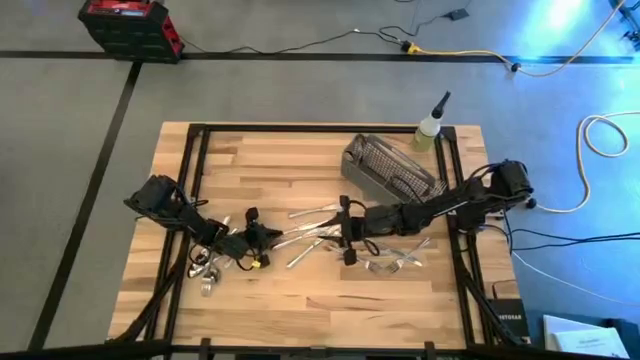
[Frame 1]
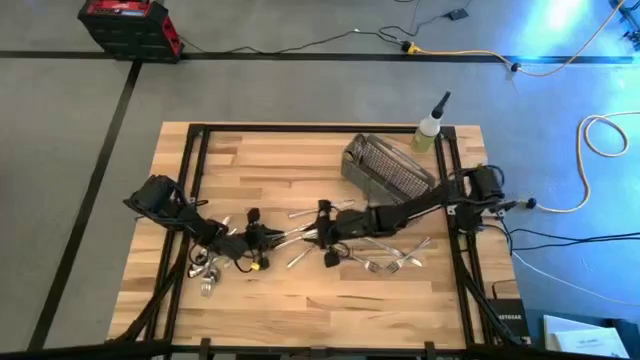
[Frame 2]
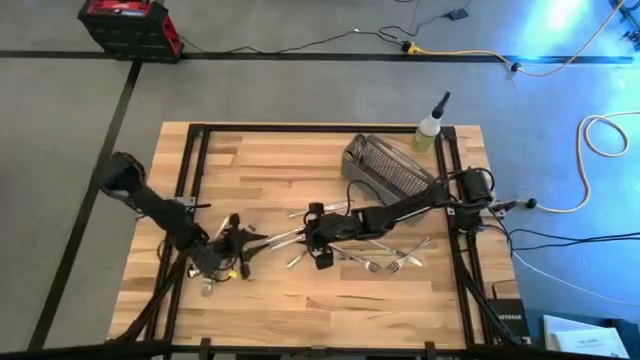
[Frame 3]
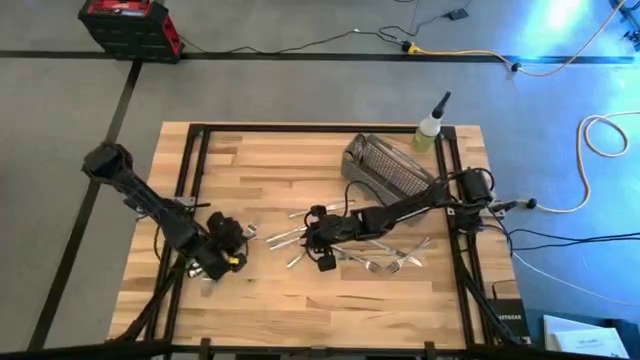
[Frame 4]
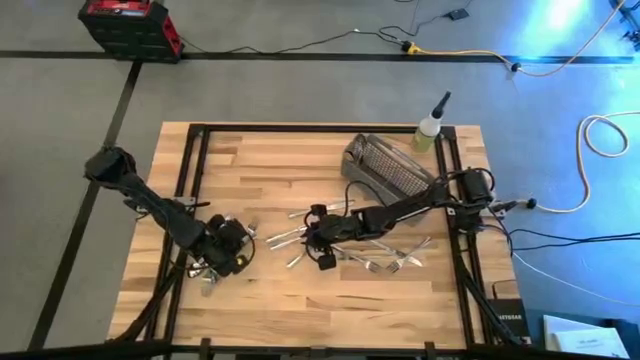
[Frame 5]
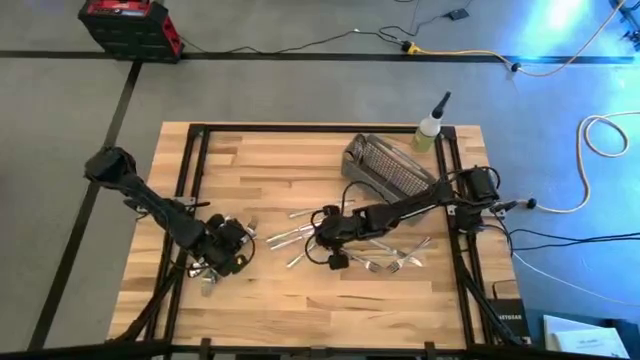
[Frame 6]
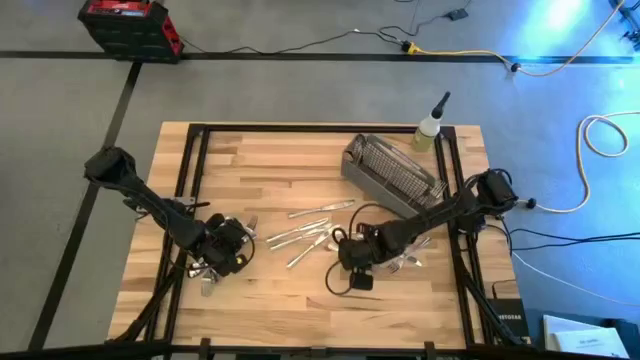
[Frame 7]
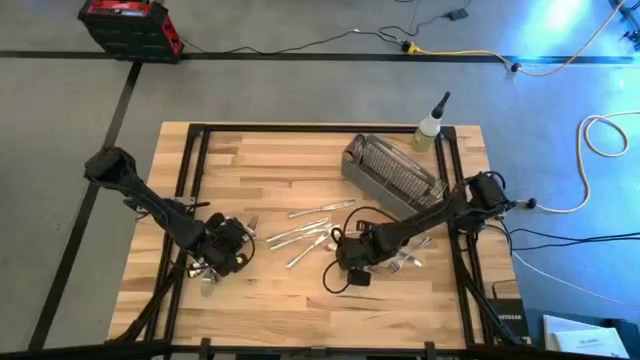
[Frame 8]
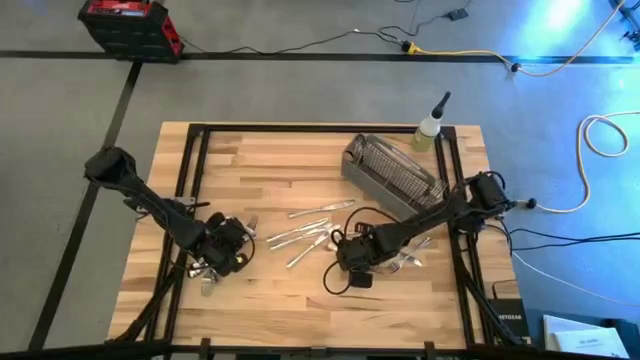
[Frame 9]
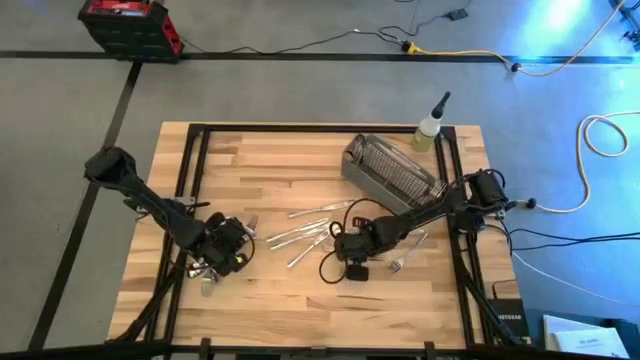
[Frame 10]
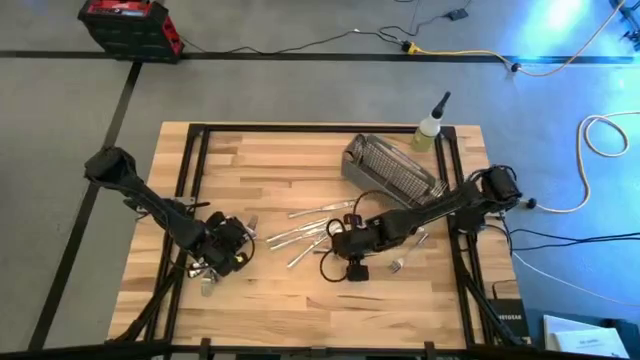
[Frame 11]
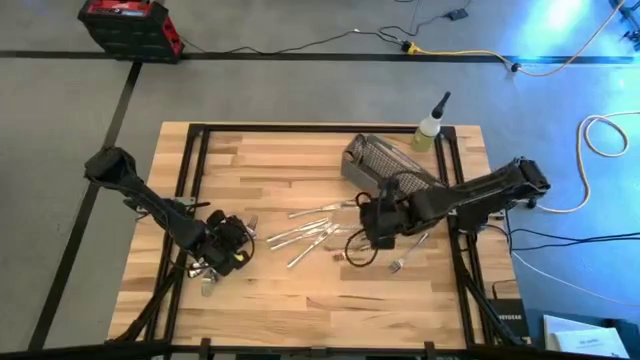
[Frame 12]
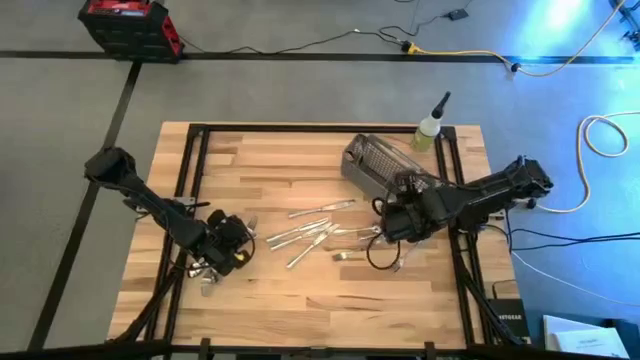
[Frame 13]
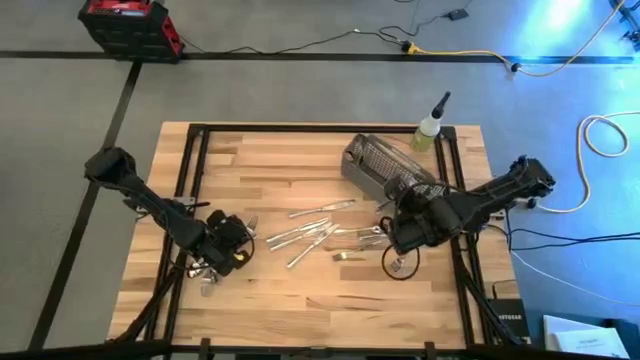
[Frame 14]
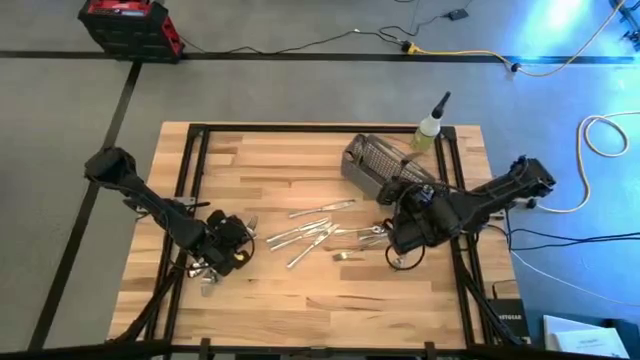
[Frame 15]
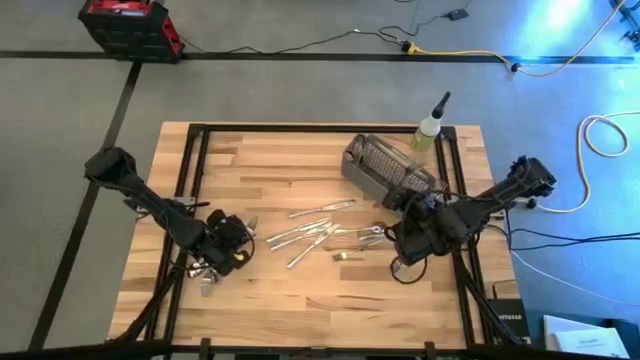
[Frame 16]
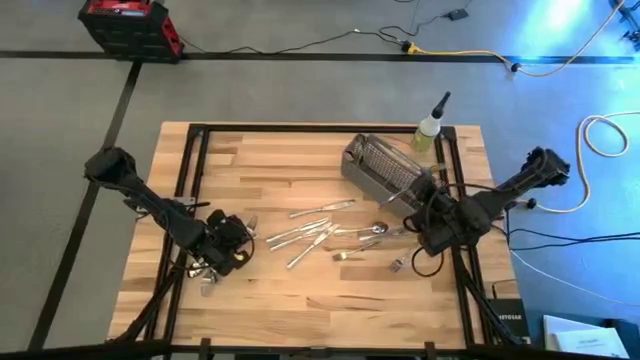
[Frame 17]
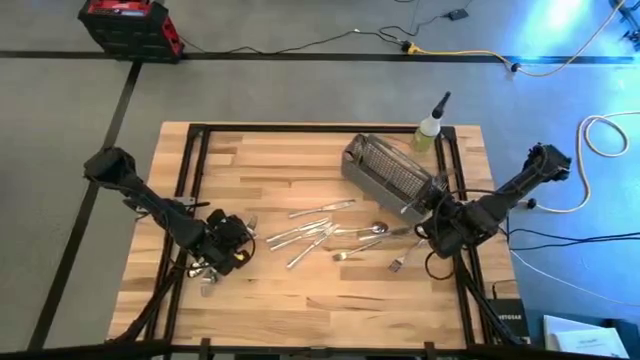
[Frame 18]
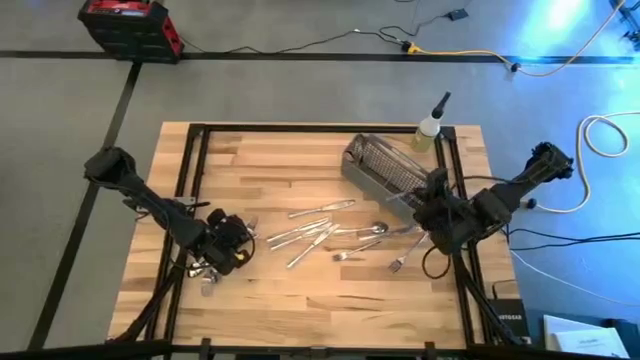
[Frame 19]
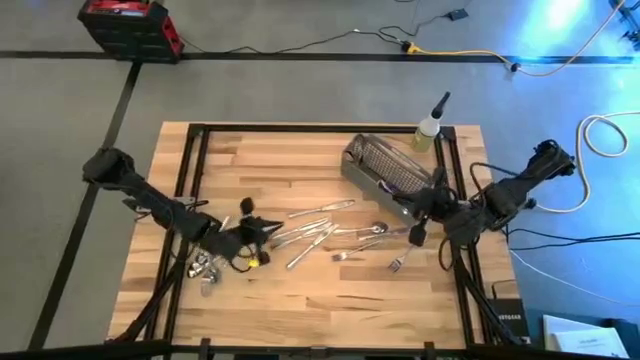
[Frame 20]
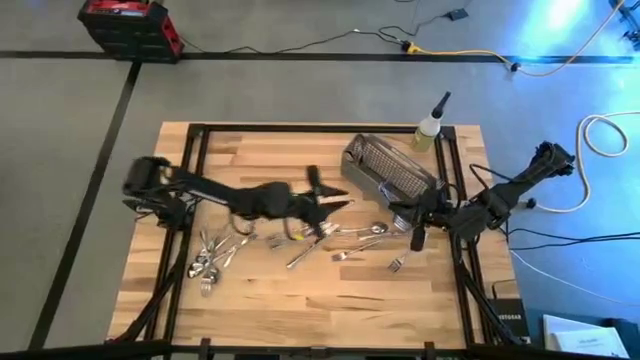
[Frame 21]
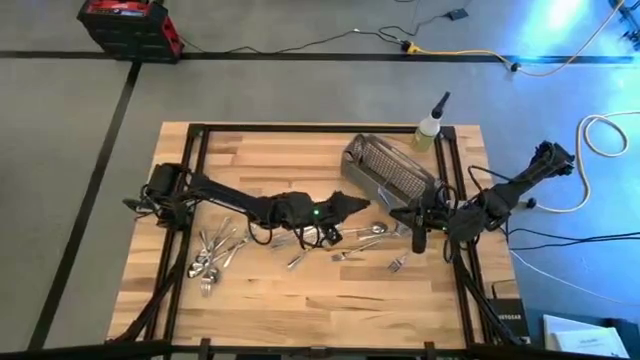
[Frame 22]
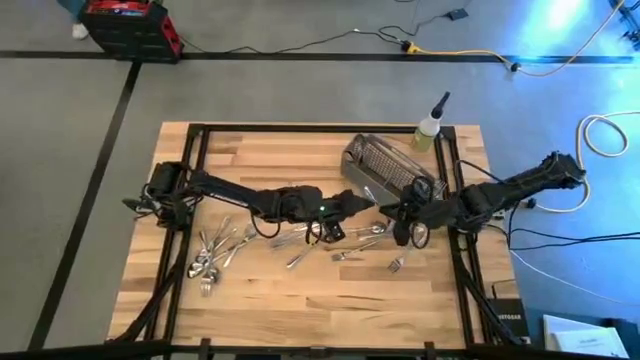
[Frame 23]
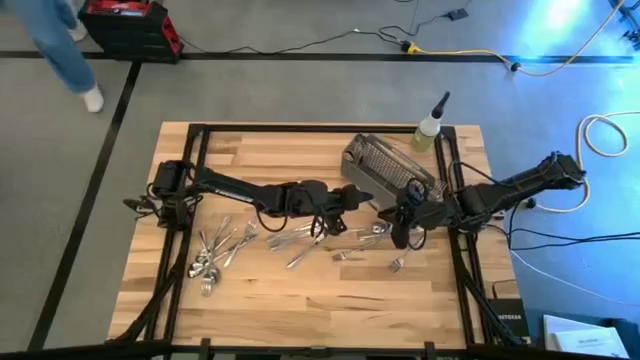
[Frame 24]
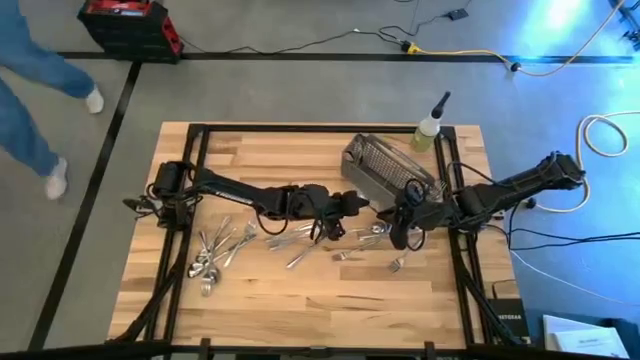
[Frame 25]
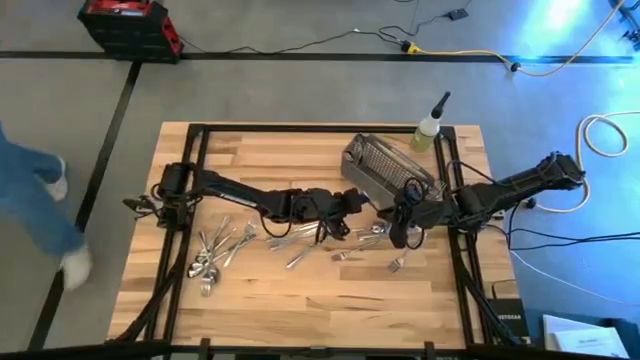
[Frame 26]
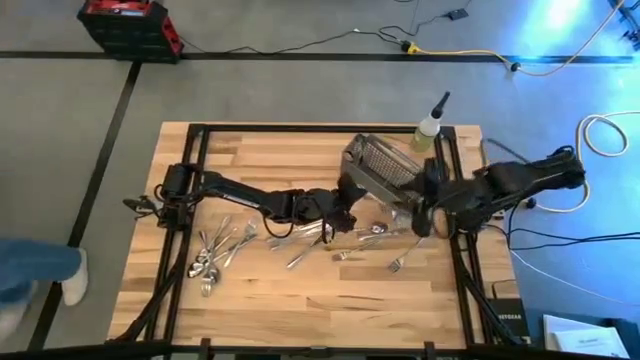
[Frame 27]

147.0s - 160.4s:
Task: Sort silverware
Put the silver fork into the gray silverware organizer

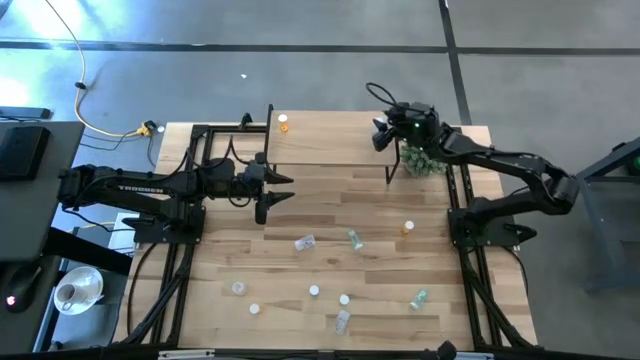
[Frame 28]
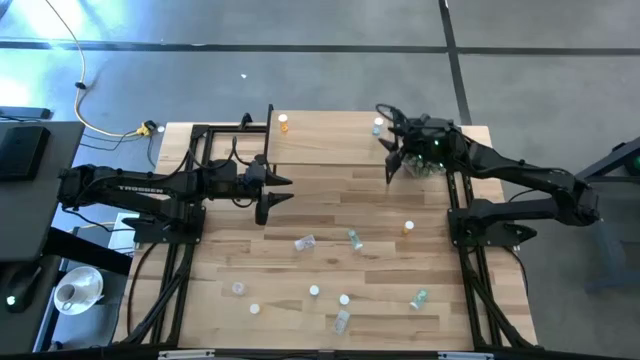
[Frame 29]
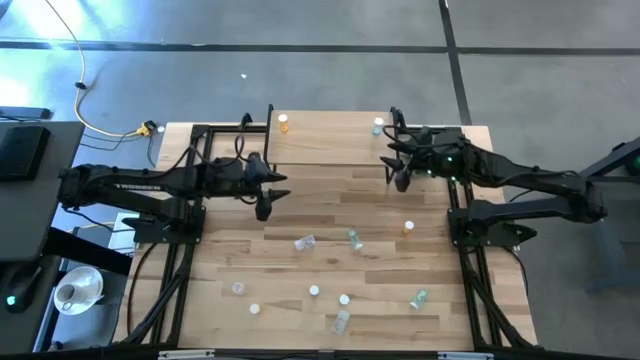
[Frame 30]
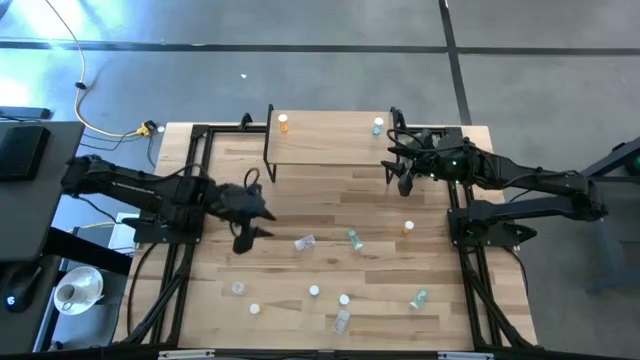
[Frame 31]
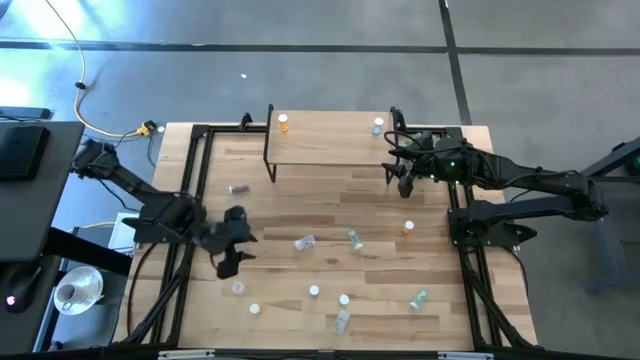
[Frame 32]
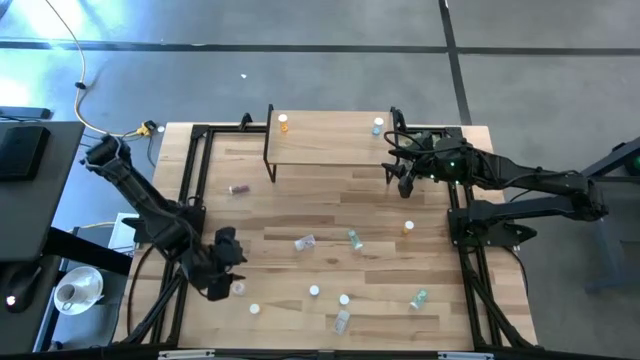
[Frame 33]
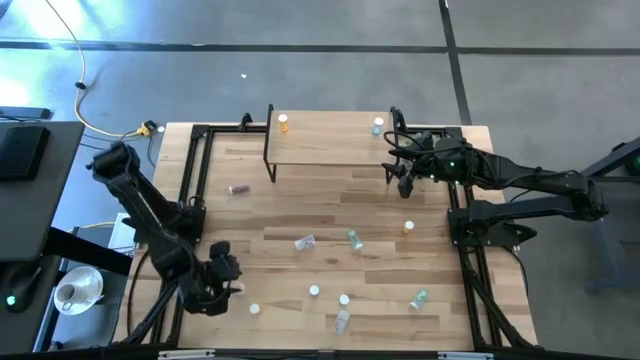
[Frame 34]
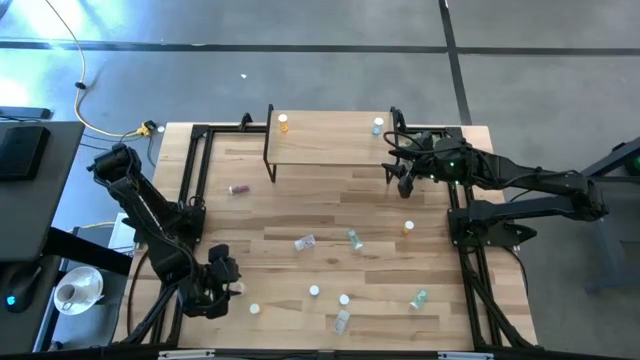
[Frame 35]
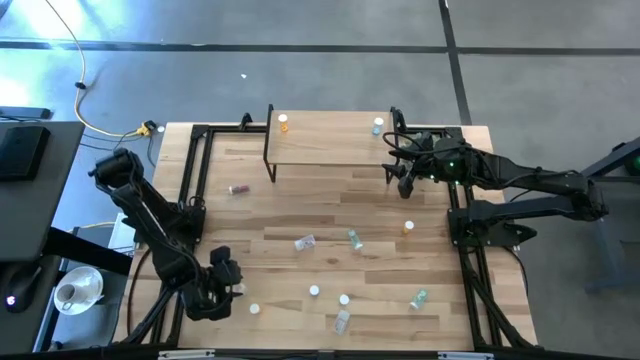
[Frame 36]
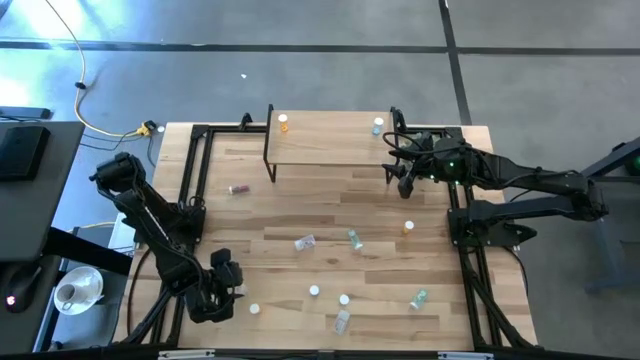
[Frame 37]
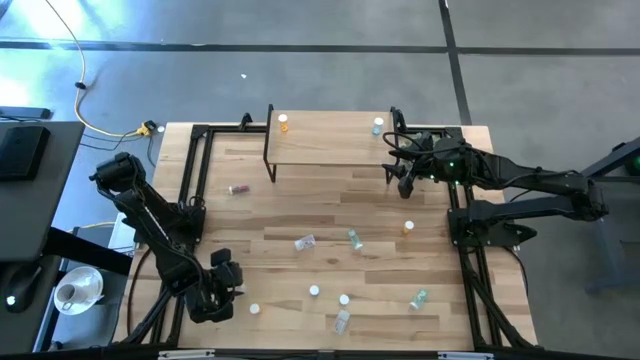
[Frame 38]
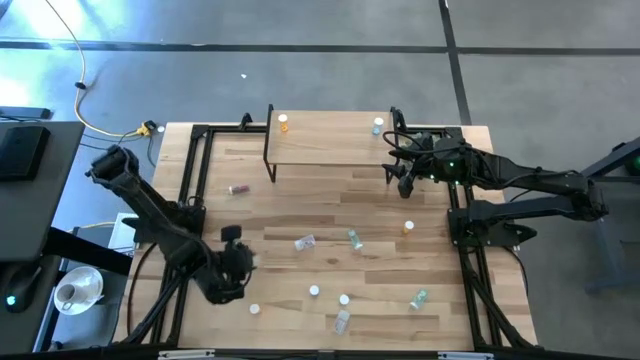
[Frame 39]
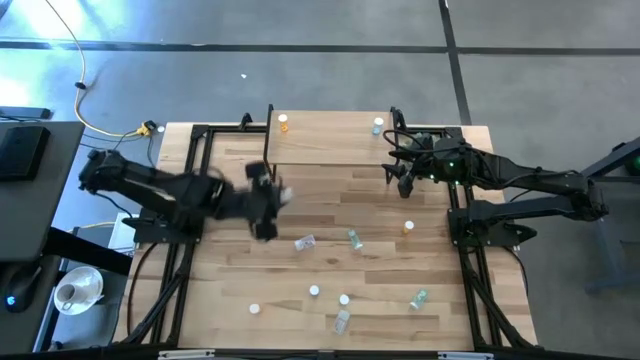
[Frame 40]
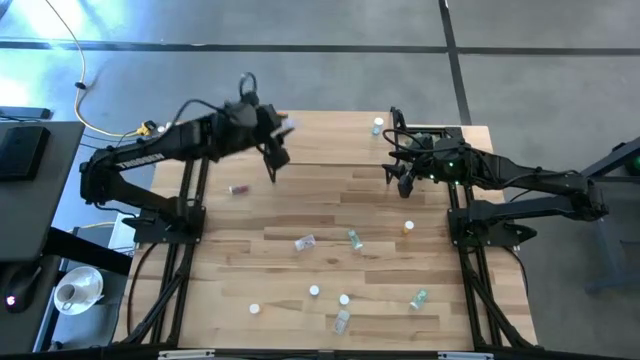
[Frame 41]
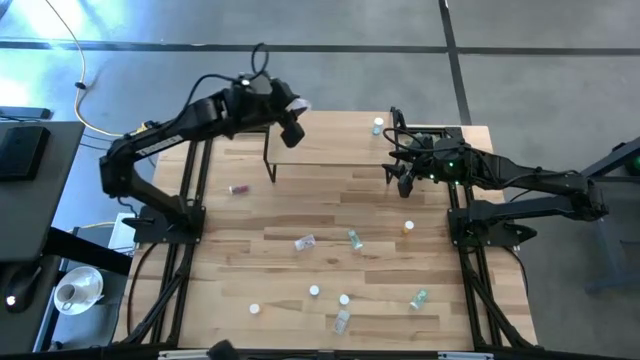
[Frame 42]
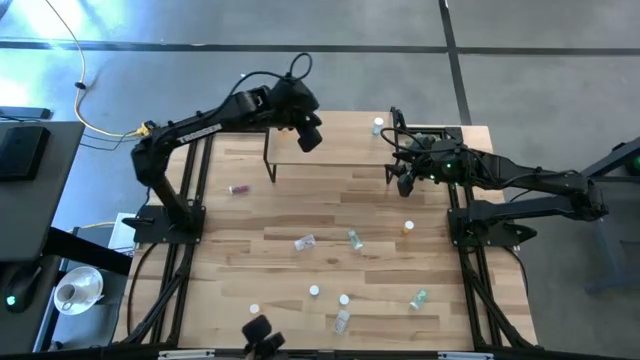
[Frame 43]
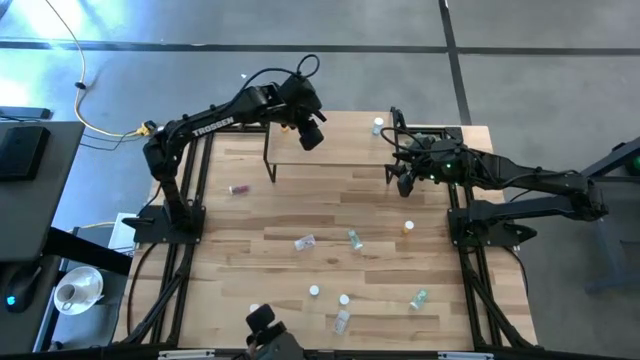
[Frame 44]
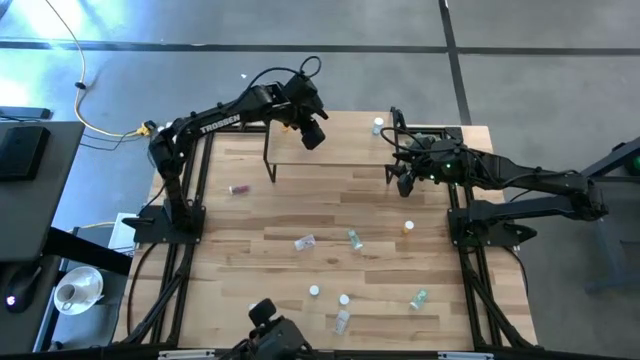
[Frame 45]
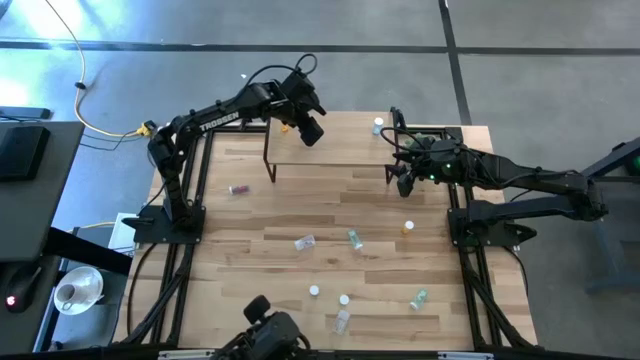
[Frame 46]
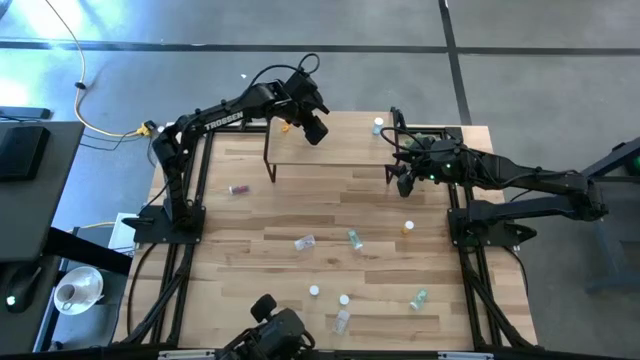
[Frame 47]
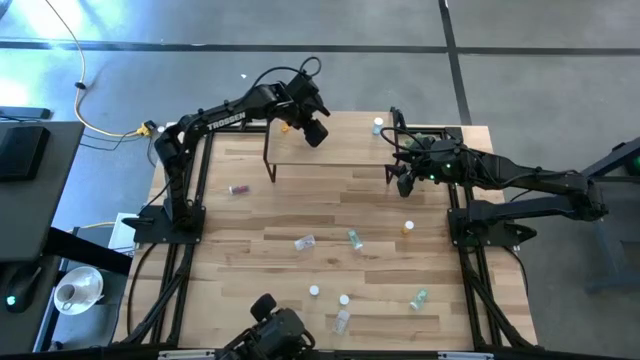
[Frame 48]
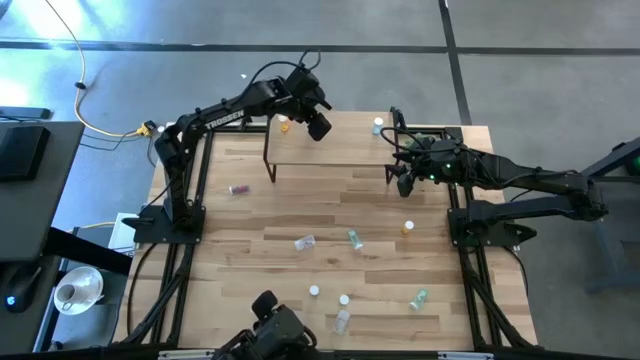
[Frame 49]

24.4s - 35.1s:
Task: Pick and place medicine bottles onto shelf by color
Put the bottom left transparent pill bottle on the shelf
